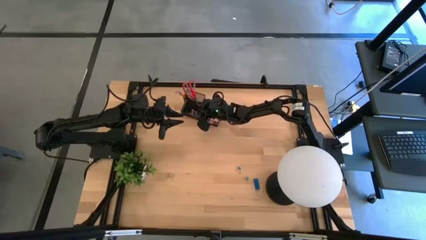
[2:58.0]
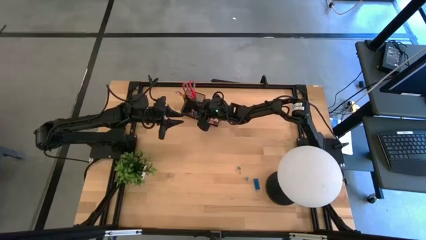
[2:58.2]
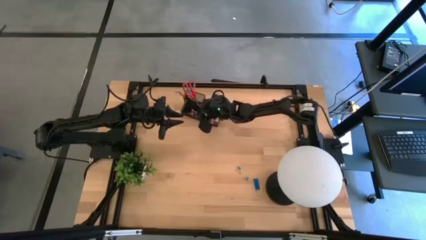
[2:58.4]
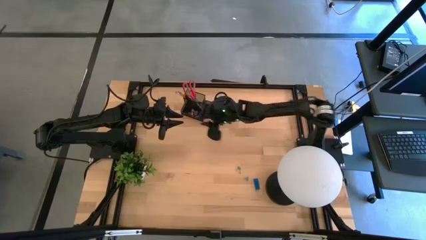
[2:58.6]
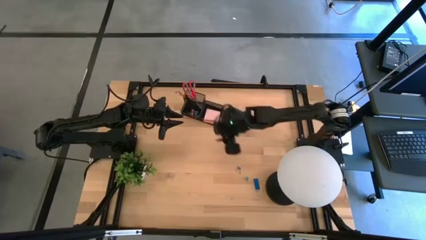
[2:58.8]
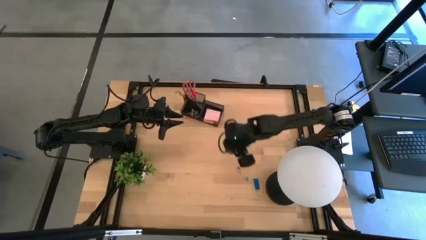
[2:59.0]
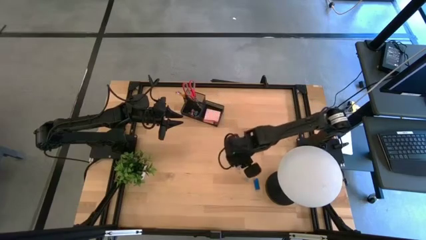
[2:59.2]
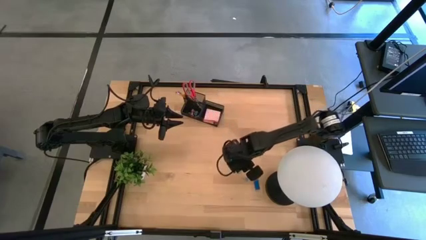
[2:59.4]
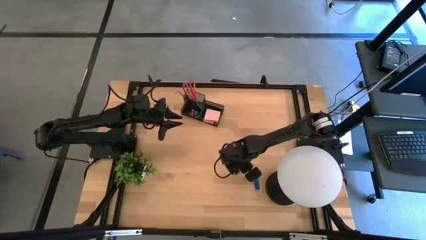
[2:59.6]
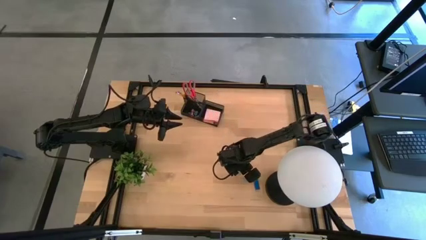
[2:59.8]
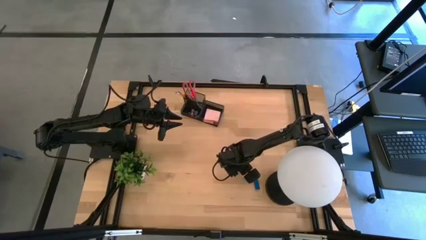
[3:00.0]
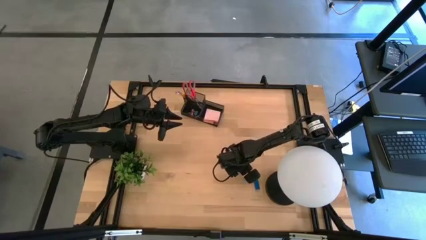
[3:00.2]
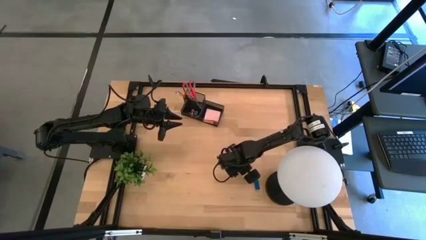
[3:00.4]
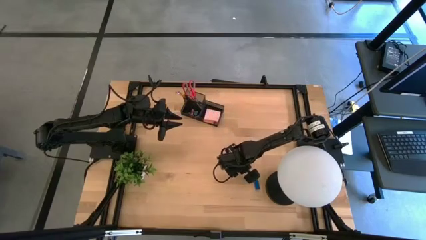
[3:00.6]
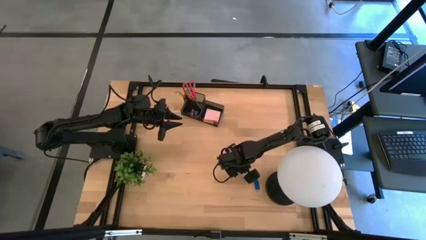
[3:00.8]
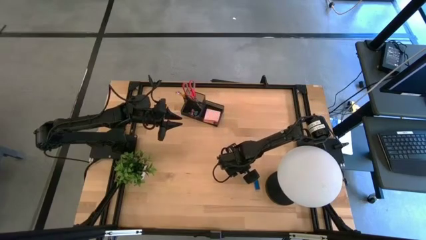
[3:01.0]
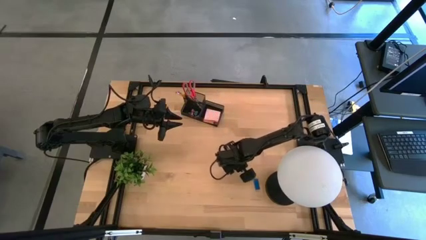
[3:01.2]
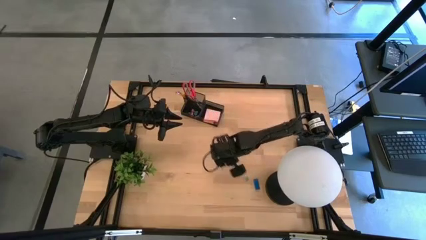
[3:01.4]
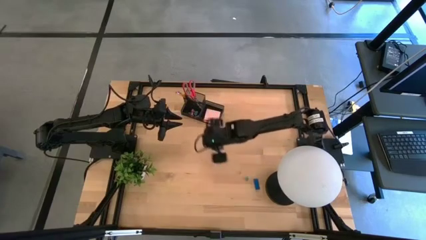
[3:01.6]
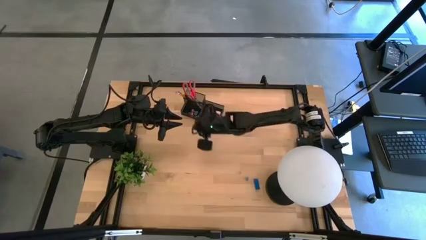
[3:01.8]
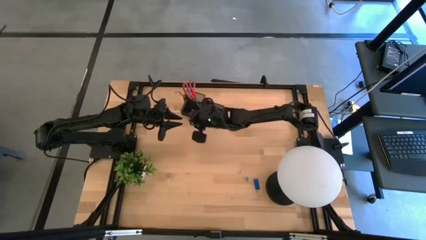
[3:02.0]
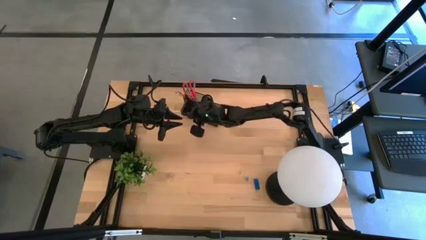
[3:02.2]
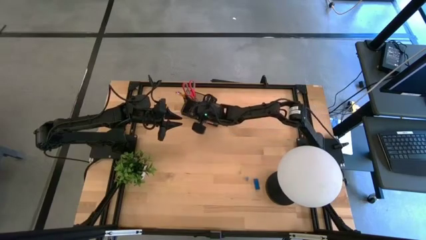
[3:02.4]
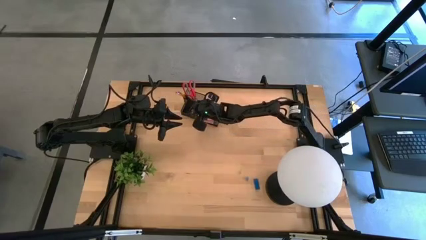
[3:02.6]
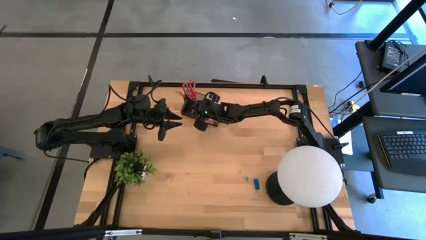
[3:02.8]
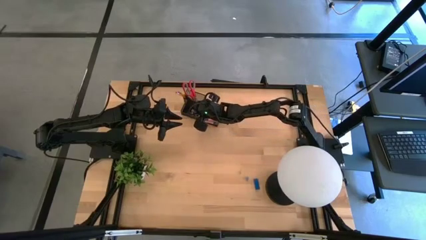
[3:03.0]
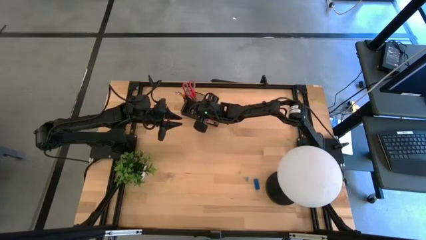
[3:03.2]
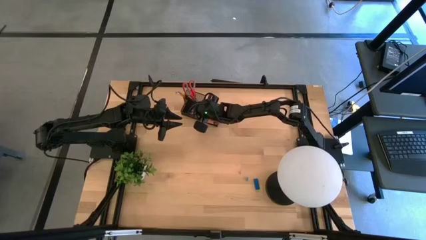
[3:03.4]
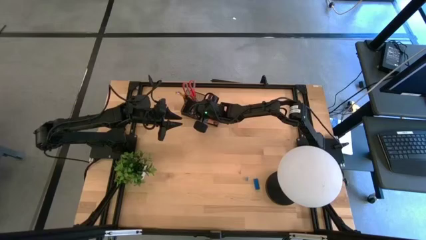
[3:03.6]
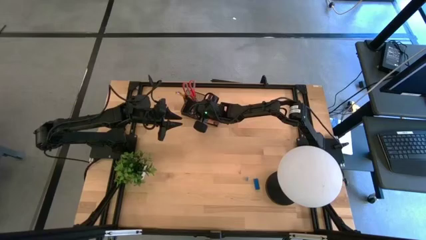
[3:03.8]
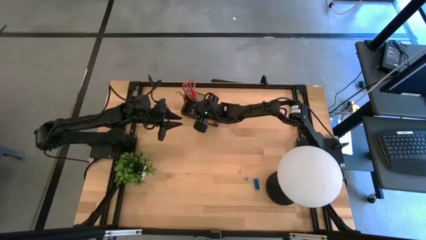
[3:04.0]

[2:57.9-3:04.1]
Task: Pick and place office supplies into organizer
Put the blue binder clip into the black desk organizer

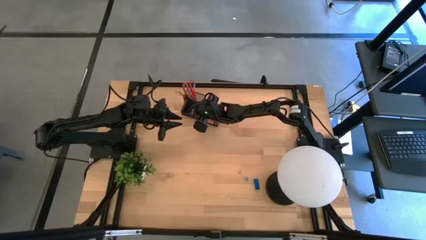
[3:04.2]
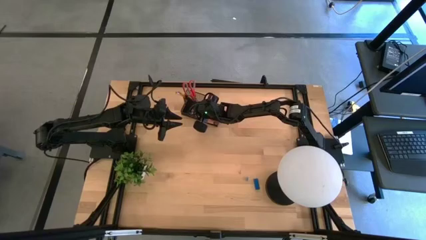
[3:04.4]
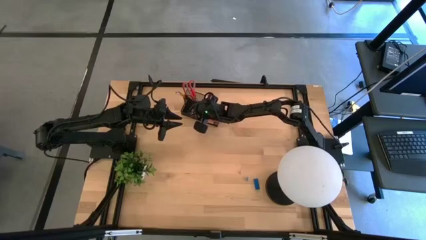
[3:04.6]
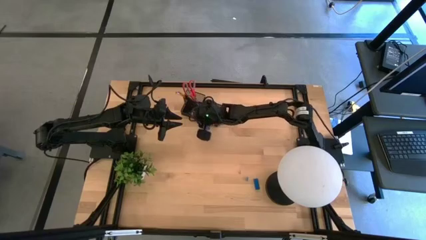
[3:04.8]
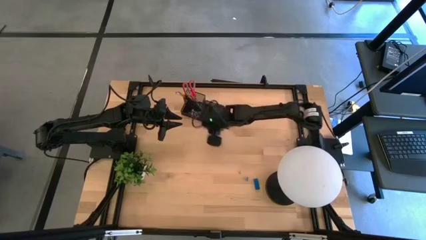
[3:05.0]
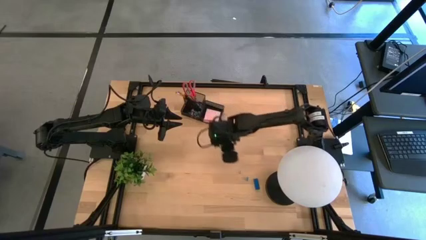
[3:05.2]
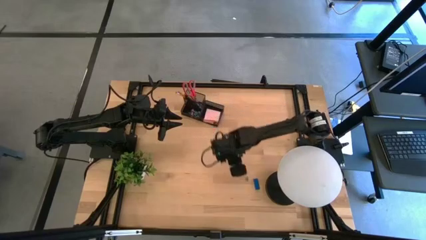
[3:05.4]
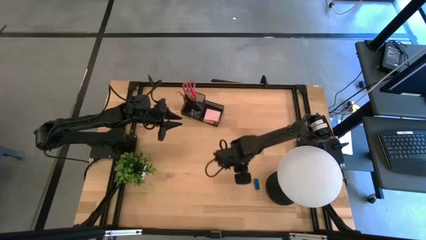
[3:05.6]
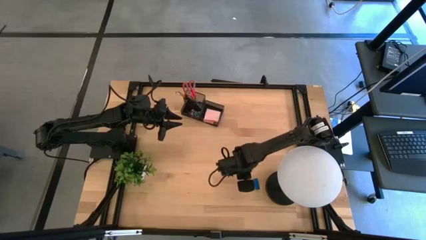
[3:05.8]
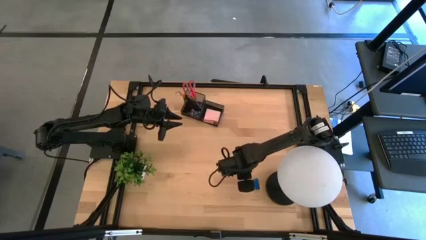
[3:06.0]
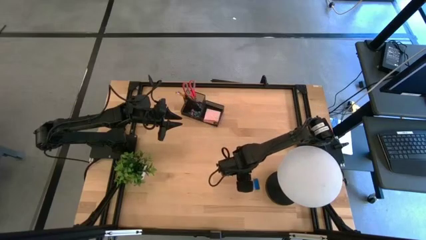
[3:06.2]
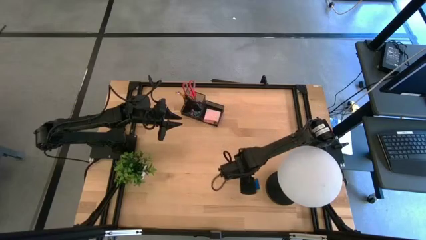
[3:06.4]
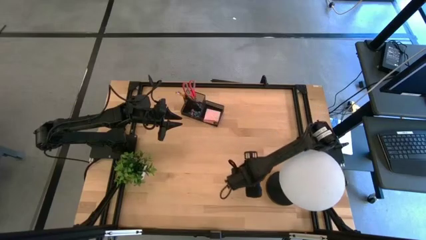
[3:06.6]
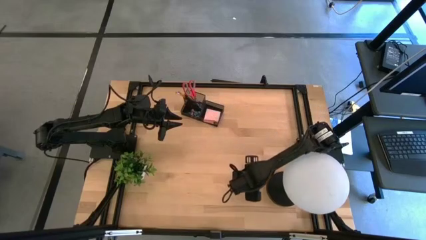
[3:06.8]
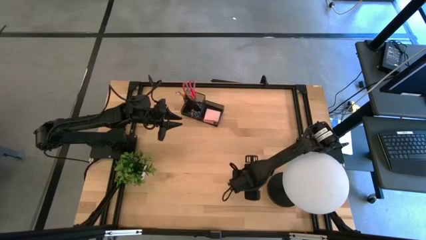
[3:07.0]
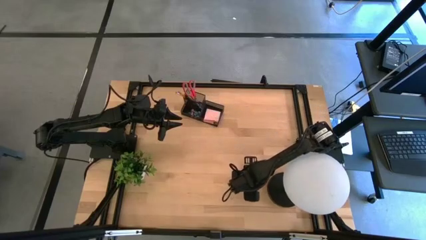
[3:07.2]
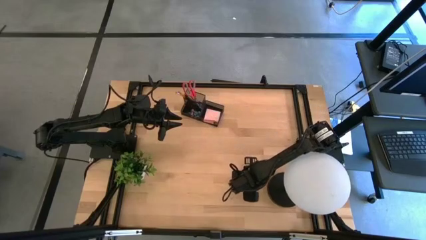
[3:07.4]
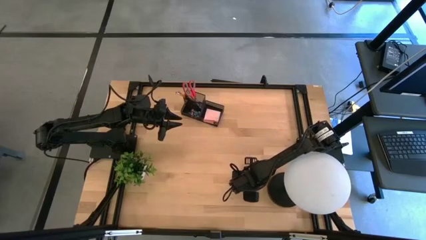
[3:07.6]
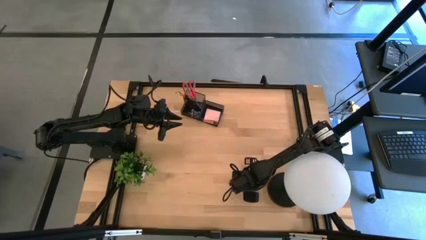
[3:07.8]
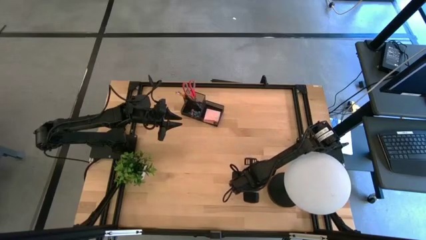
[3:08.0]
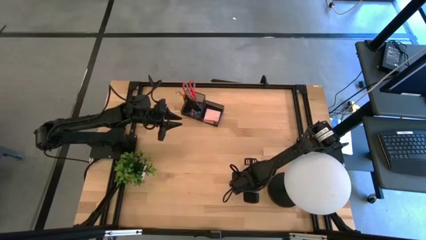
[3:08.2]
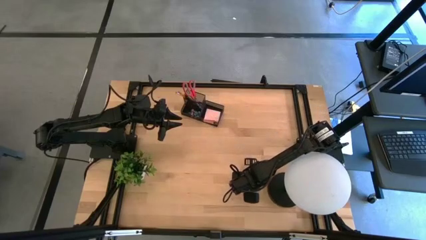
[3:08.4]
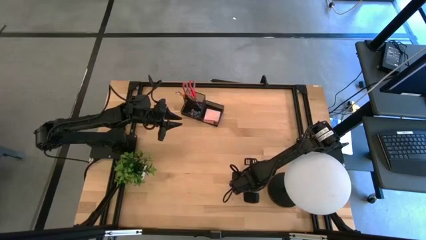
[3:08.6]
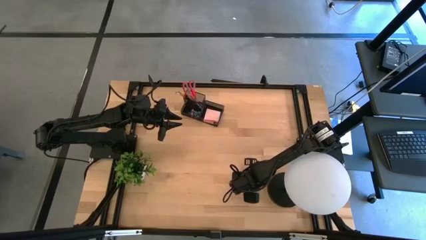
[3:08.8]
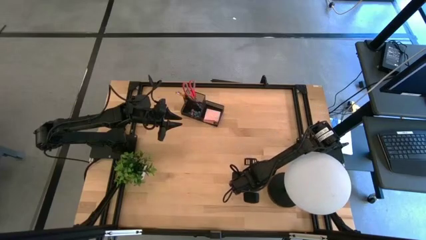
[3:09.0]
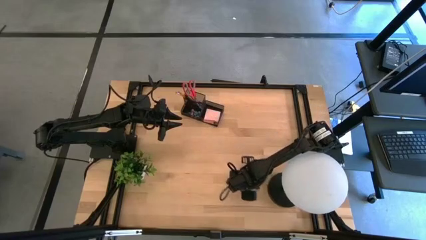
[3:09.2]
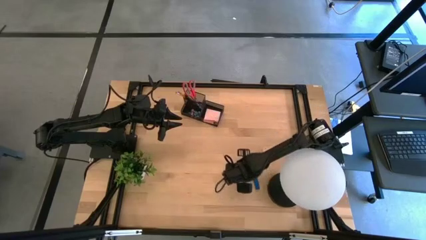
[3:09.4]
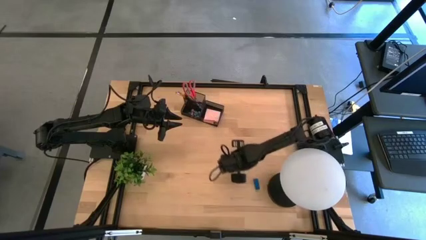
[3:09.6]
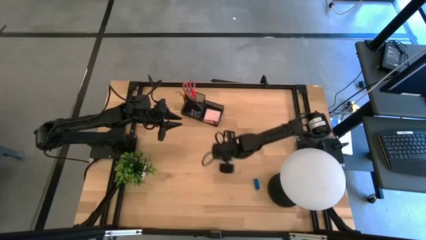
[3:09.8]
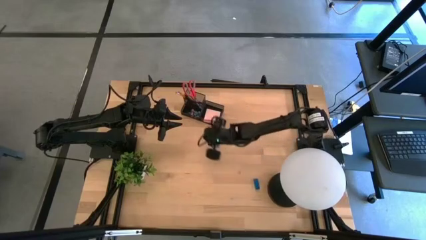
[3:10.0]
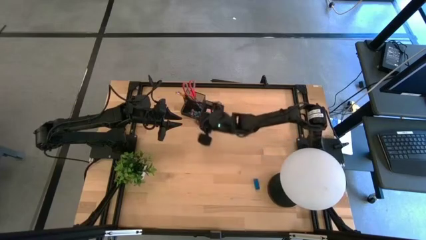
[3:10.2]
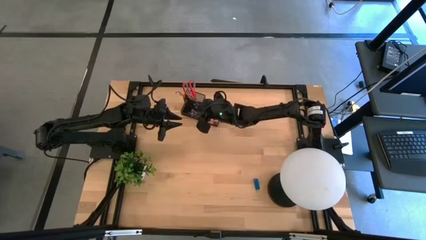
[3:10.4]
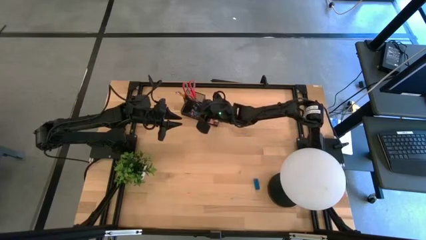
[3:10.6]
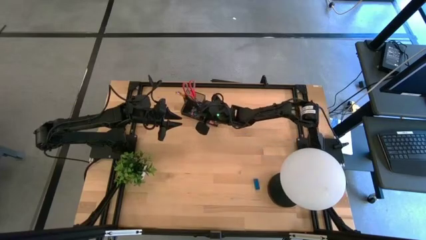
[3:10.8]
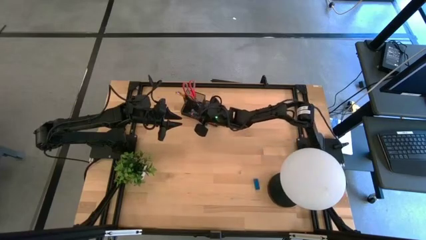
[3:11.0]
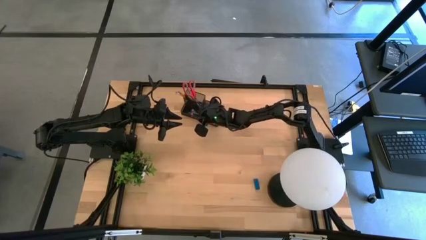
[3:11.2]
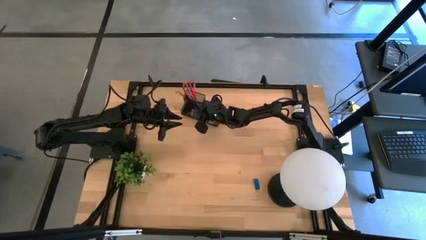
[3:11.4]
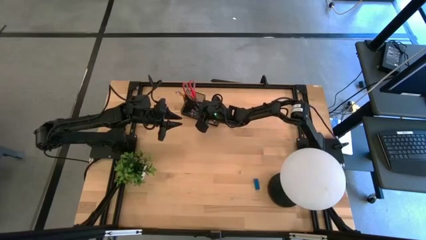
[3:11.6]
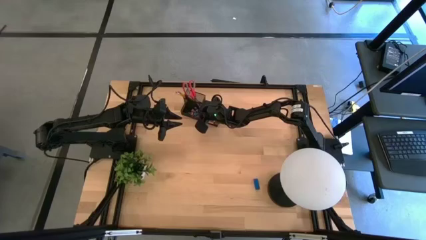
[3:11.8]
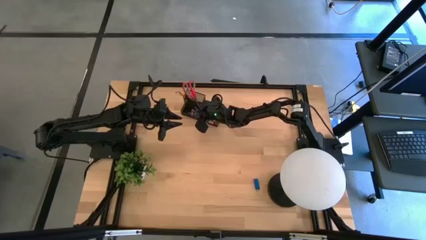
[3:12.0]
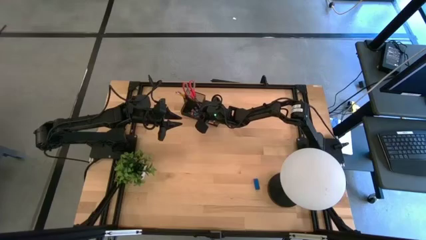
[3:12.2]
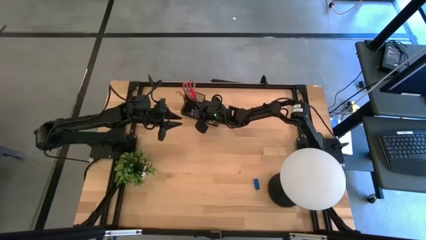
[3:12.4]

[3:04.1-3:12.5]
Put the blue binder clip into the black desk organizer
